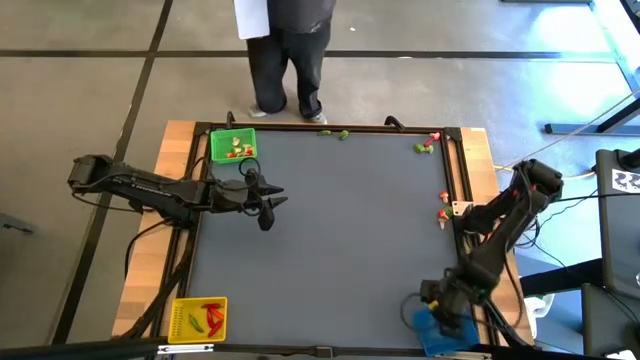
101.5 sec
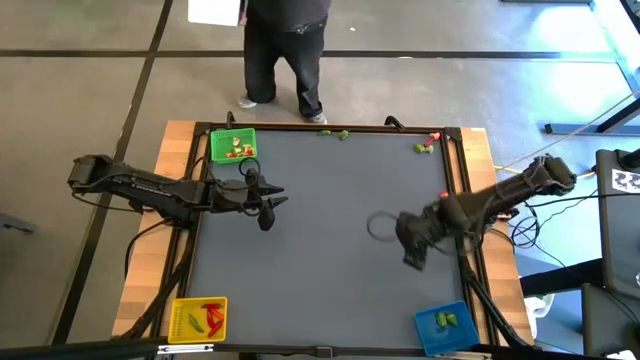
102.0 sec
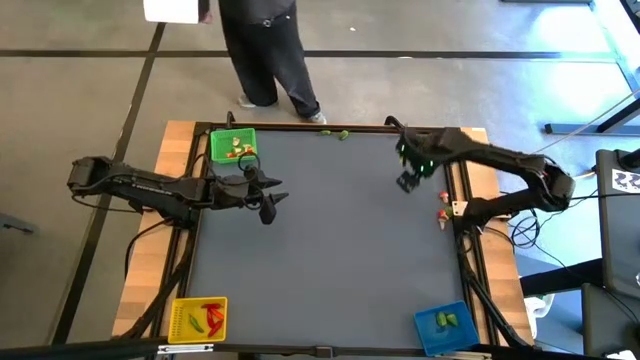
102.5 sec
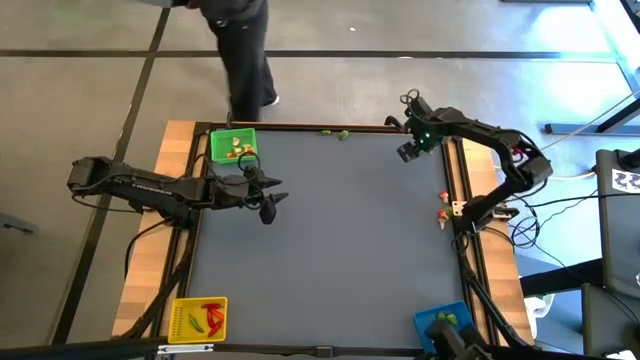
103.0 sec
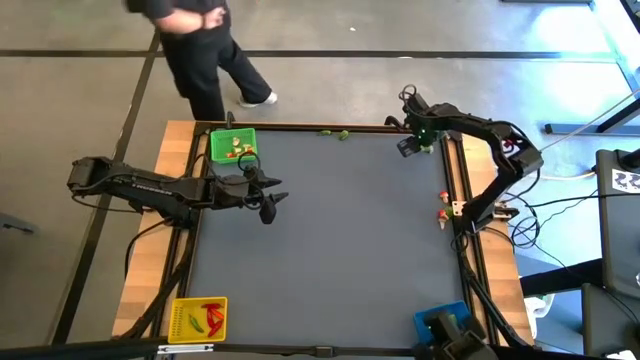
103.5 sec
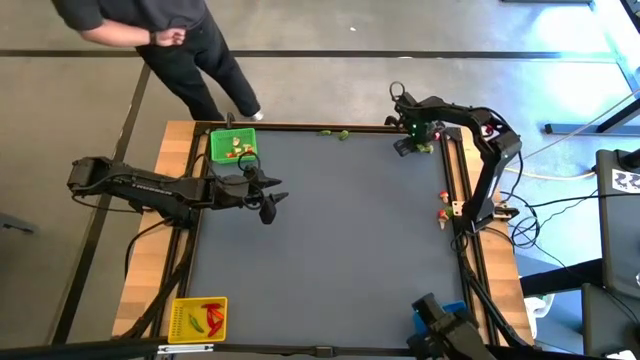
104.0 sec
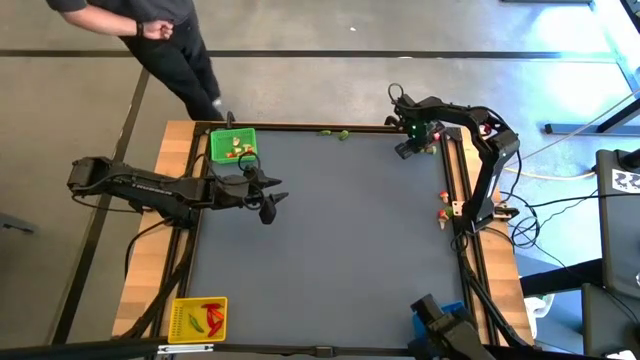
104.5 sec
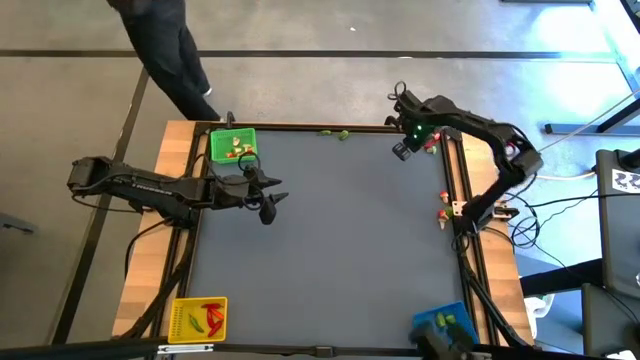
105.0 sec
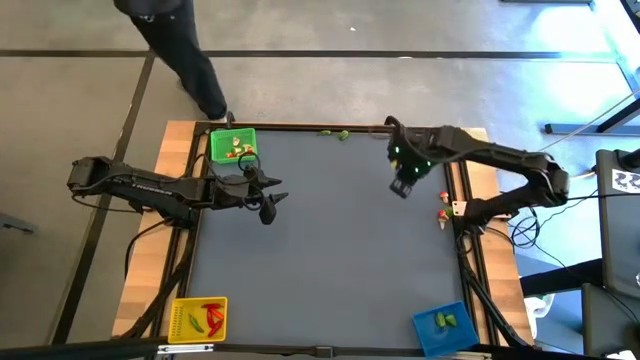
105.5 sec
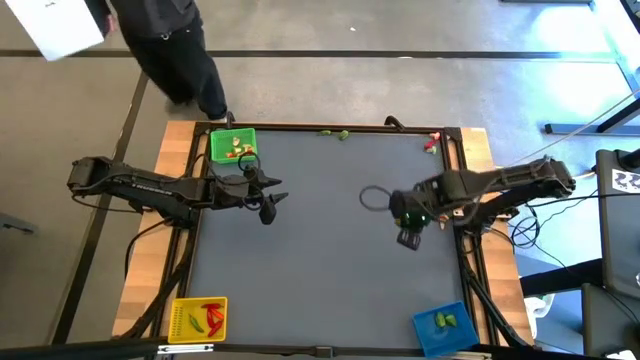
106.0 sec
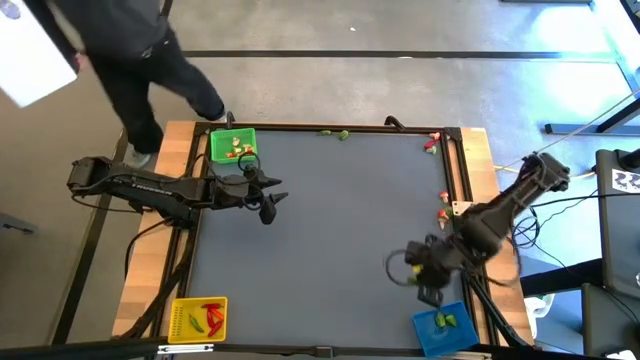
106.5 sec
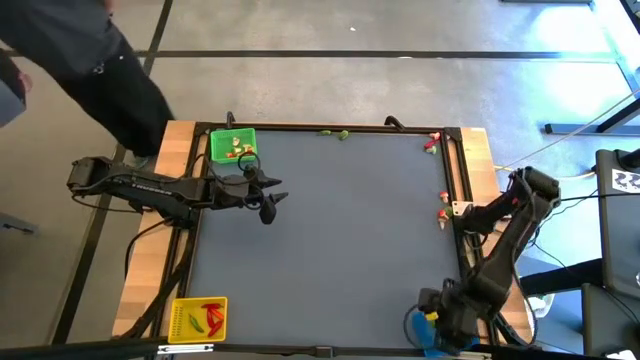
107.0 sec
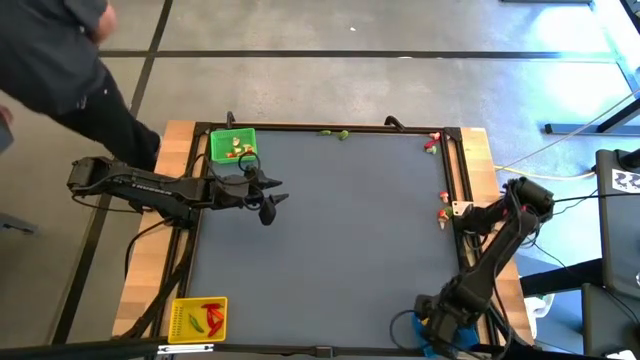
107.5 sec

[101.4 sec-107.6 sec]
Task: Sort produce into baskets
Put the green chili pepper into the blue bin

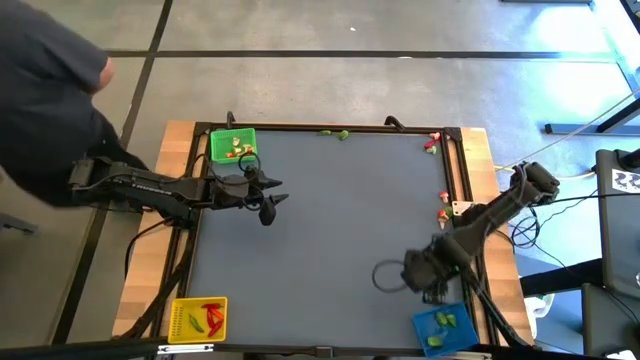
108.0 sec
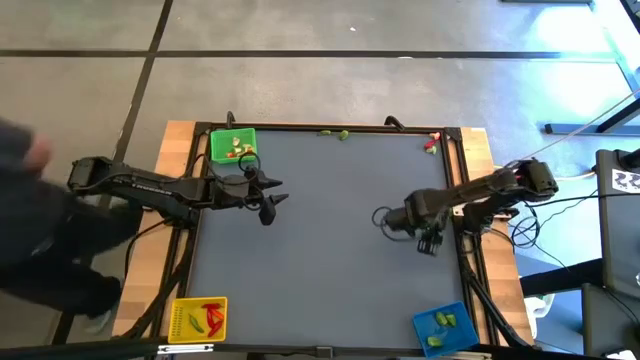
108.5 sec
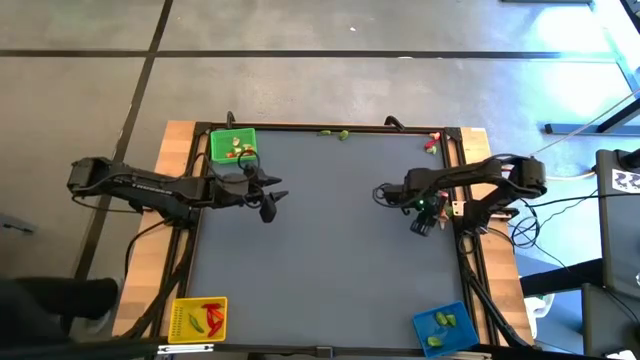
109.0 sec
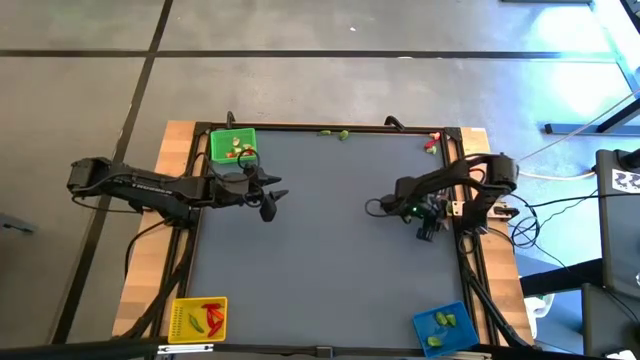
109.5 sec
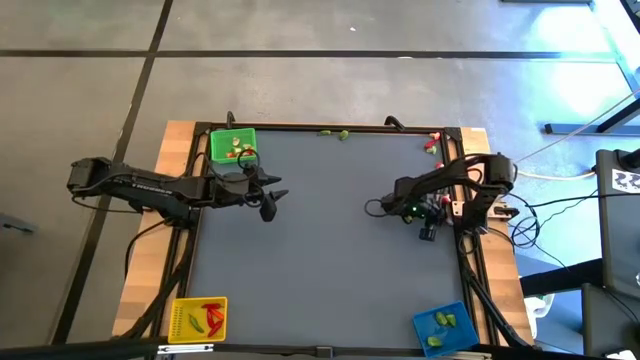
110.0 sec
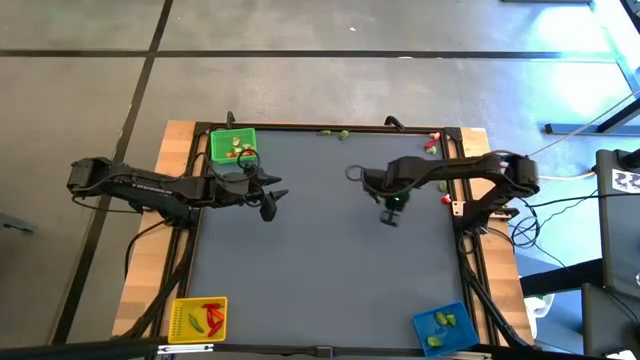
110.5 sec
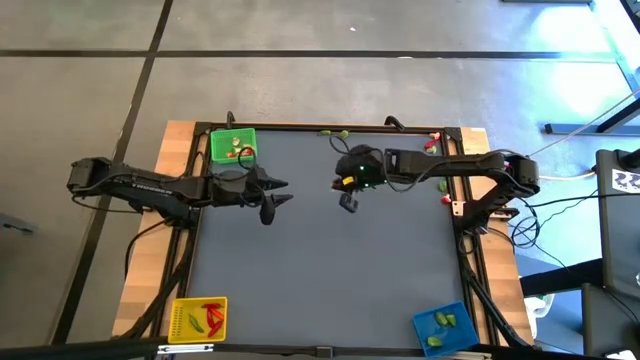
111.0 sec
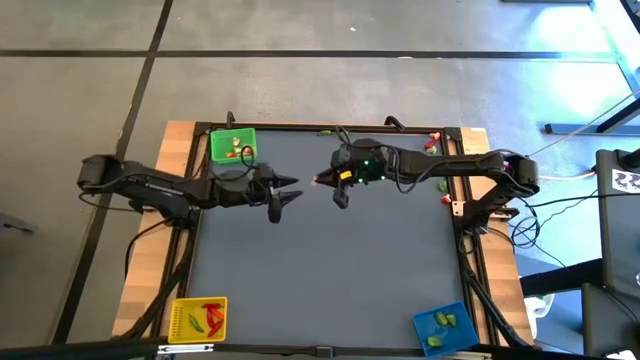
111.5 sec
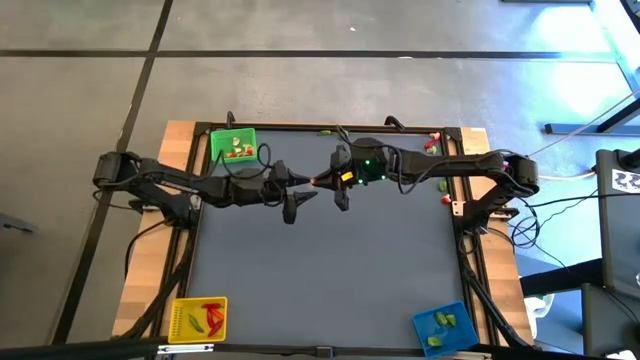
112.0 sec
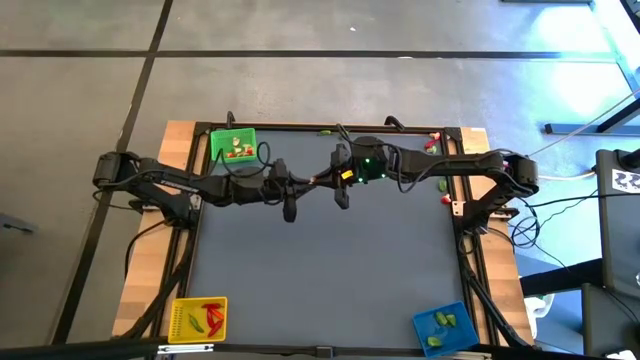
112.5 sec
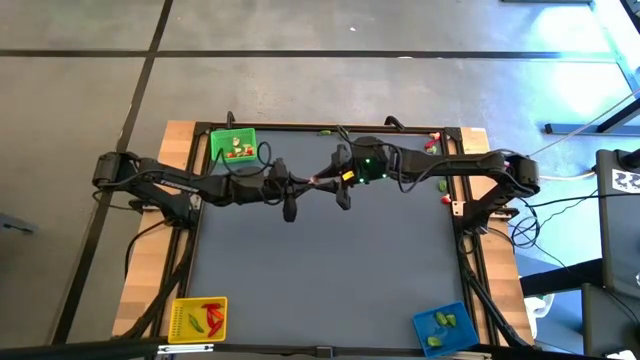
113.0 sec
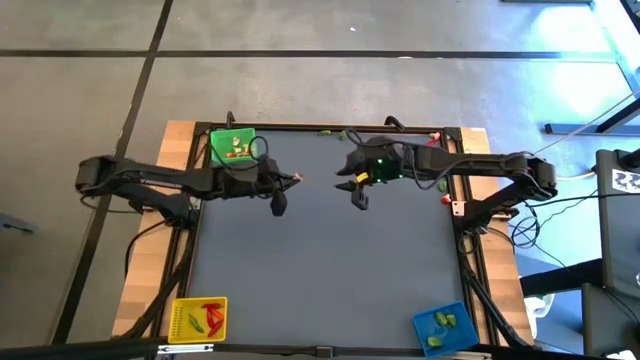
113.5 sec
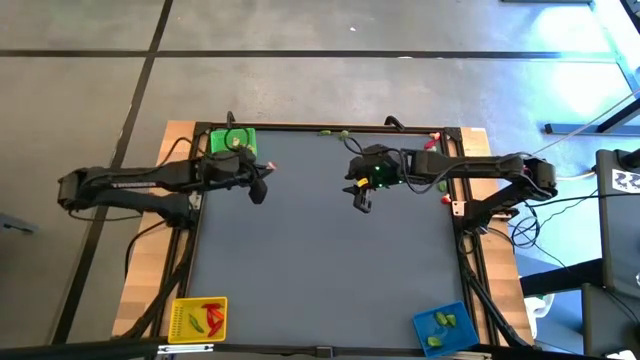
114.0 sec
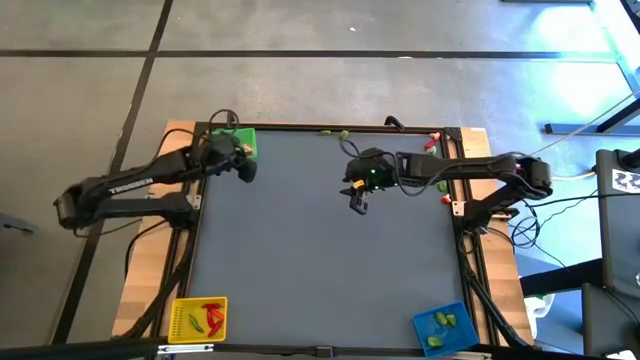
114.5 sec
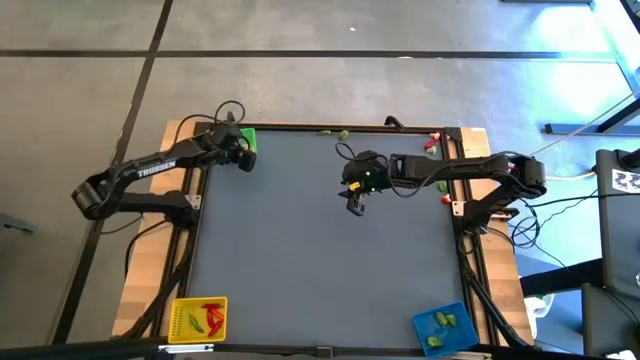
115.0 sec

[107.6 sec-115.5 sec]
Put the brown mushroom into the green bin

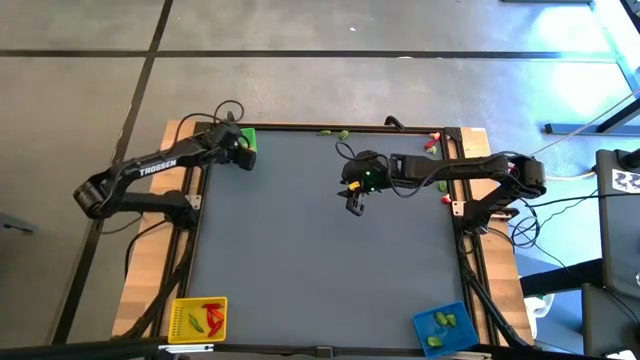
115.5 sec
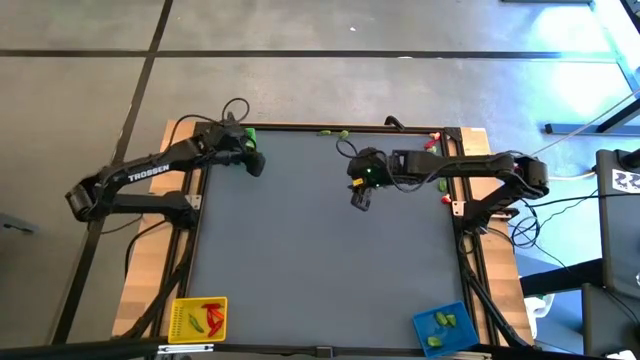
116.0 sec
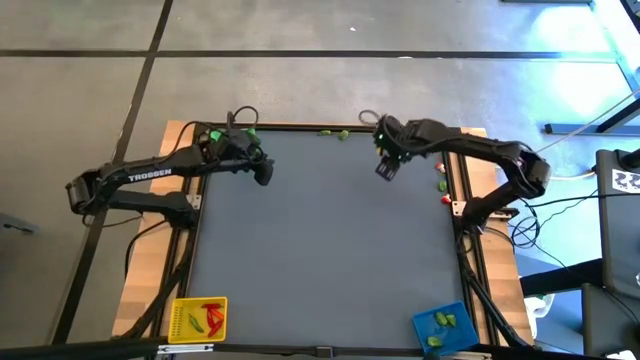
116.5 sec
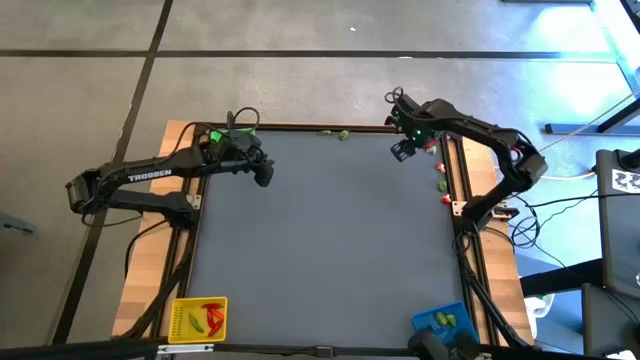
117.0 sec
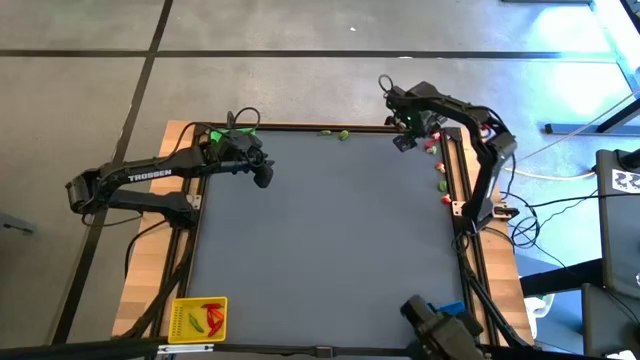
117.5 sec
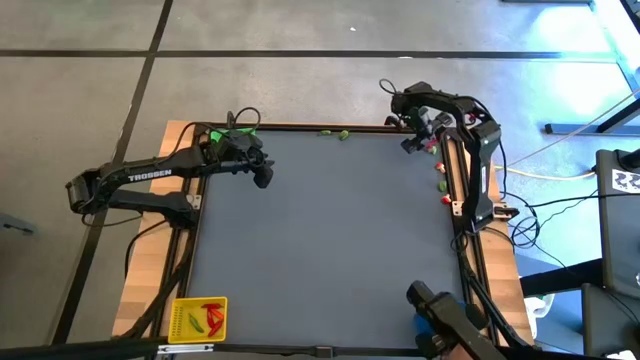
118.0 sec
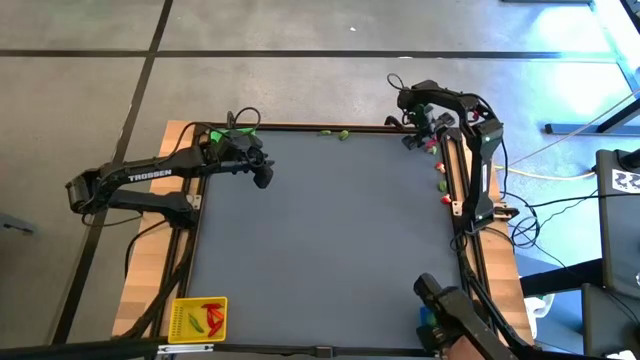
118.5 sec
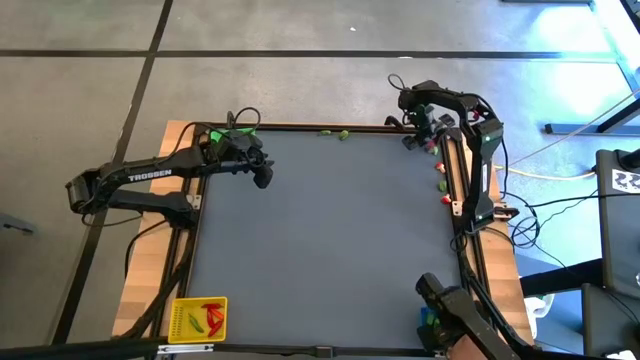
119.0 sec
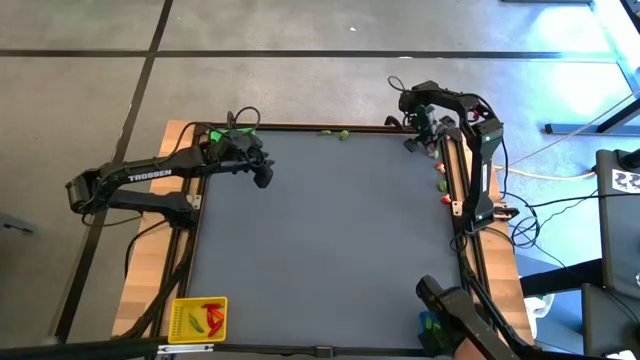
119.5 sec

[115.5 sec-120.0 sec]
Put the brown mushroom into the green bin
